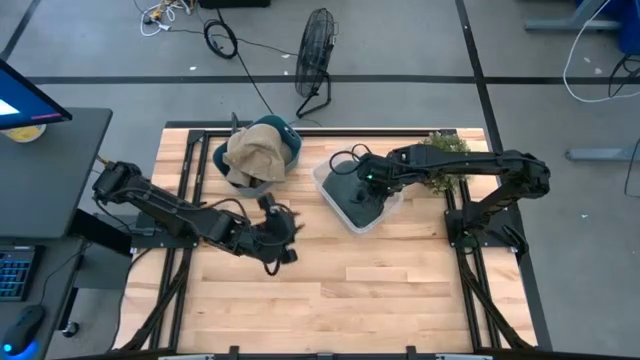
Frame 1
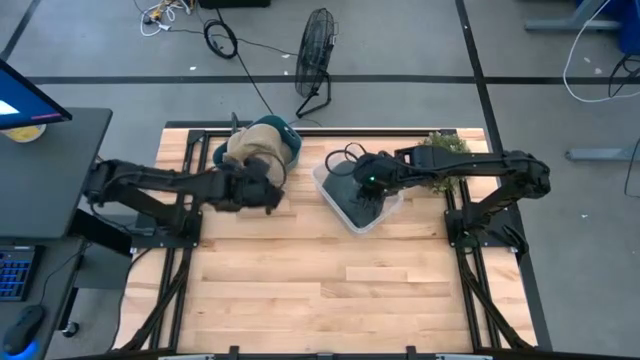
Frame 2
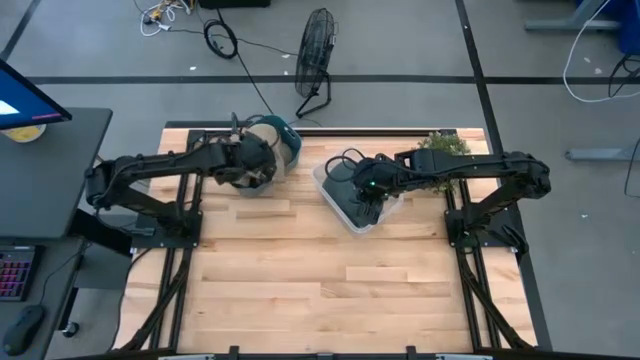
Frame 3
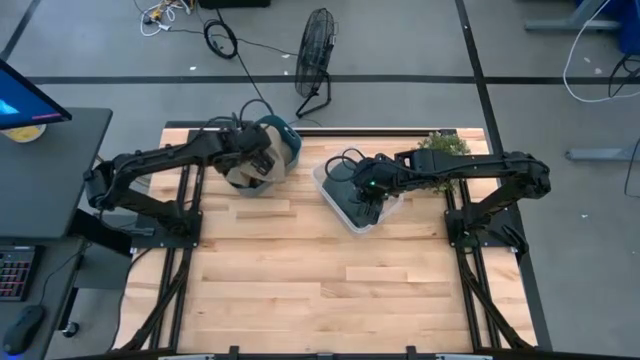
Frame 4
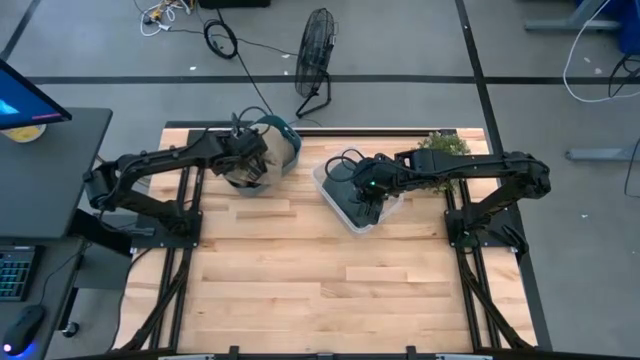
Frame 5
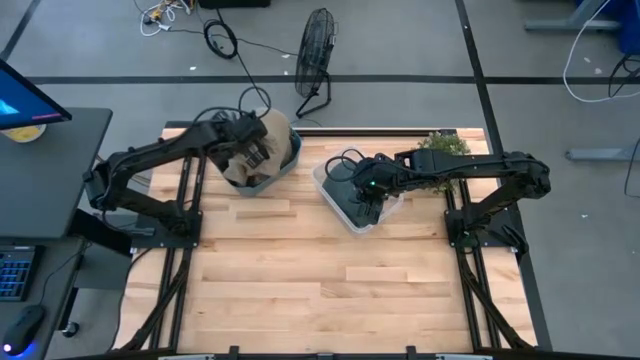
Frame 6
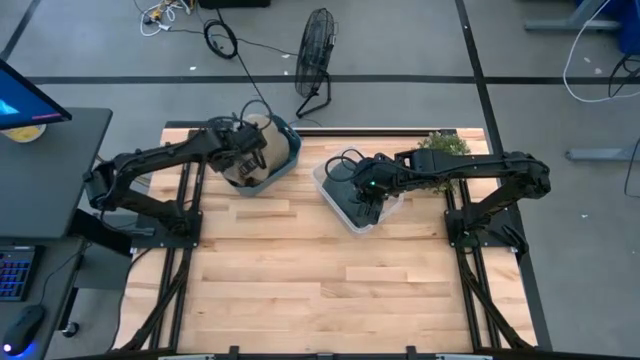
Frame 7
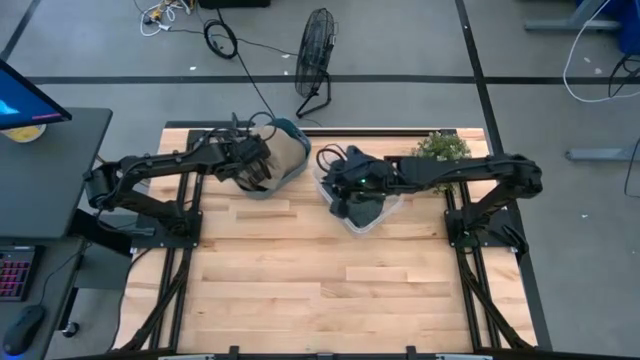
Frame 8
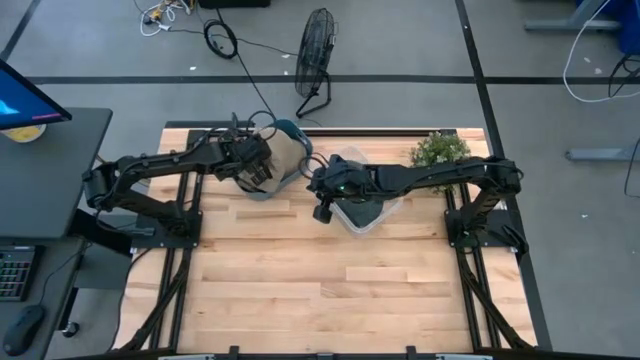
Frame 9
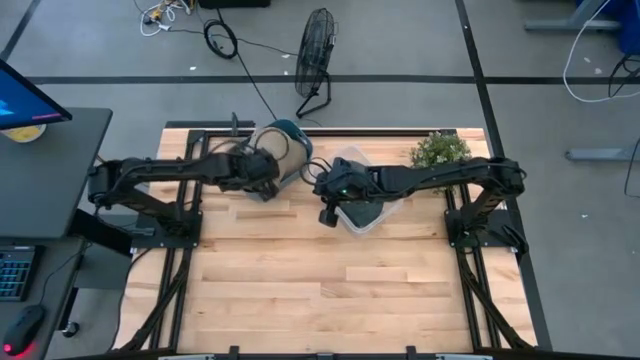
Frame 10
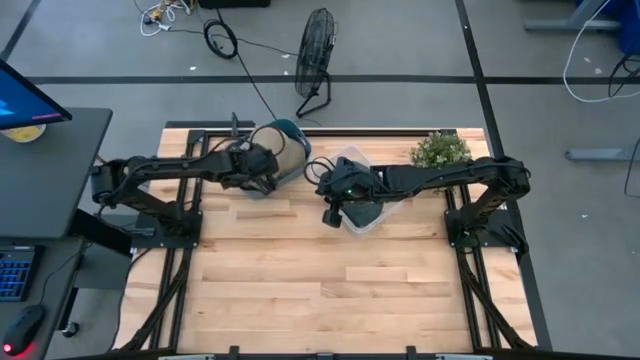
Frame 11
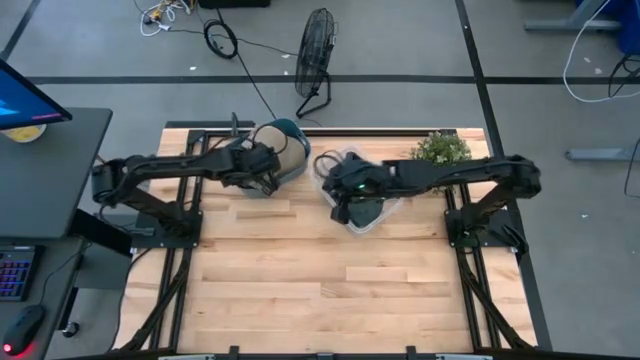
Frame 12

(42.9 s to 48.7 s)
Task: Pick & Place hat
Adjust the brown caps in the blue bin

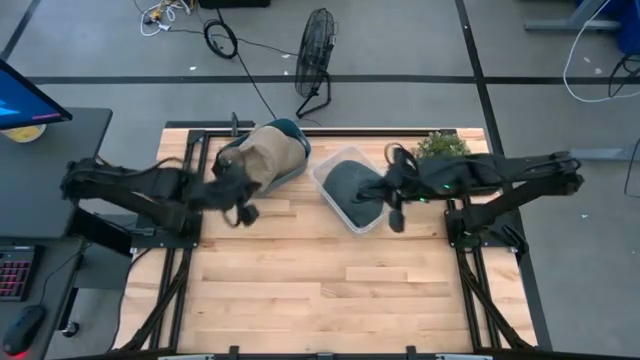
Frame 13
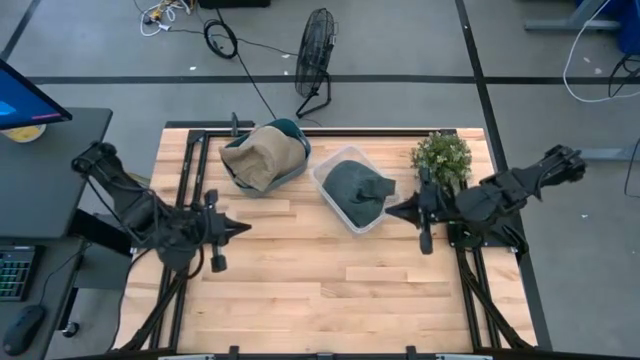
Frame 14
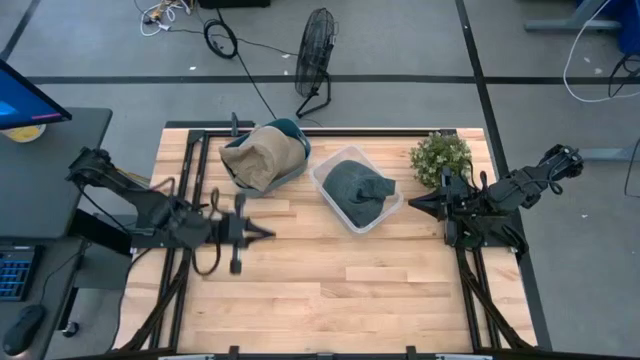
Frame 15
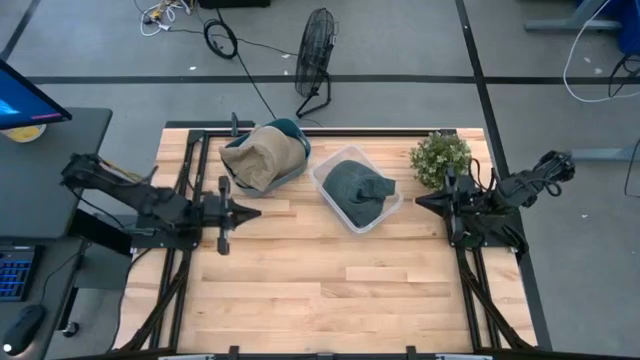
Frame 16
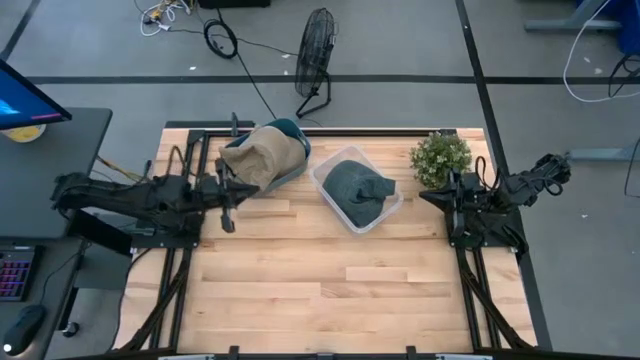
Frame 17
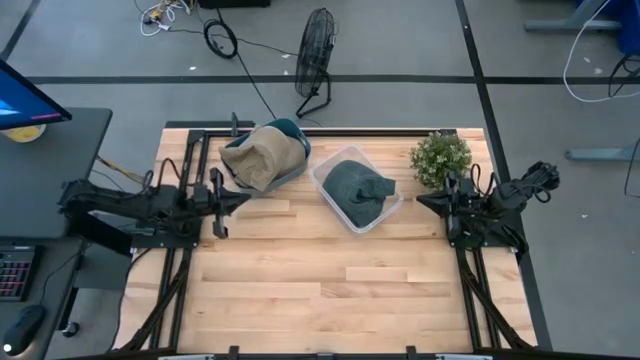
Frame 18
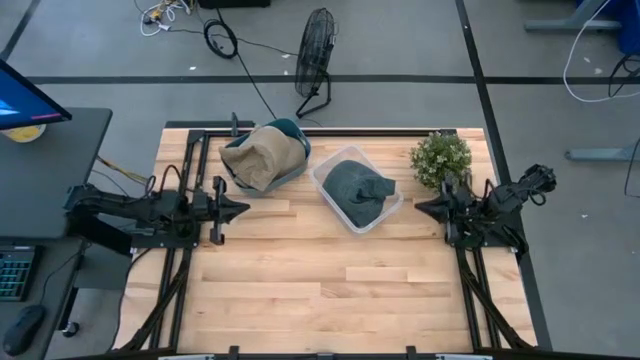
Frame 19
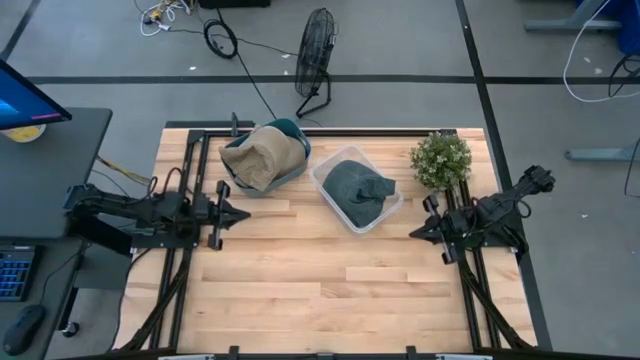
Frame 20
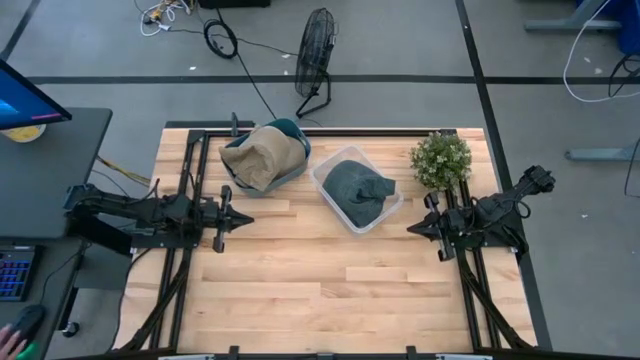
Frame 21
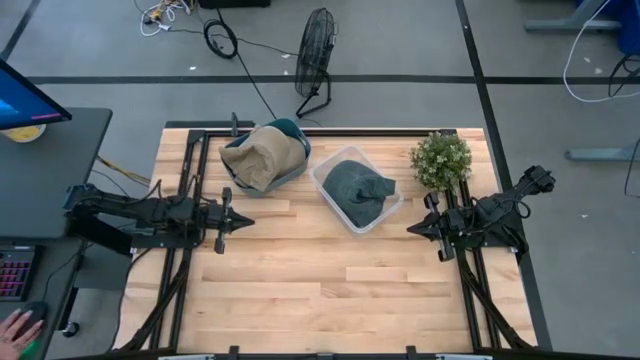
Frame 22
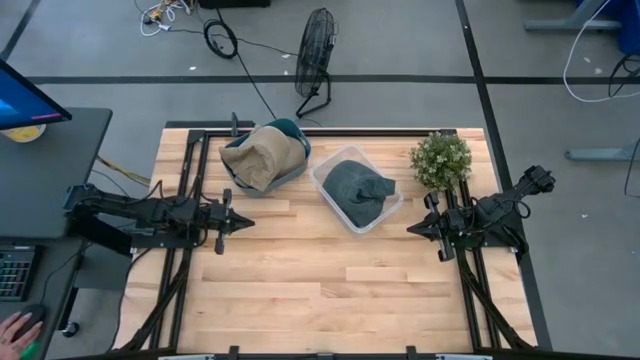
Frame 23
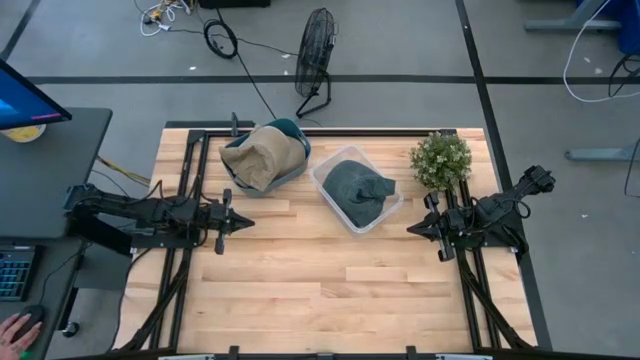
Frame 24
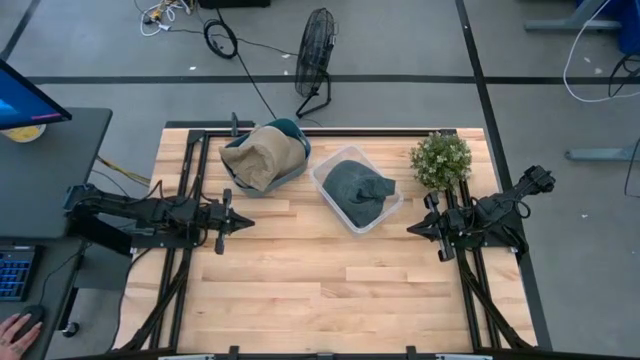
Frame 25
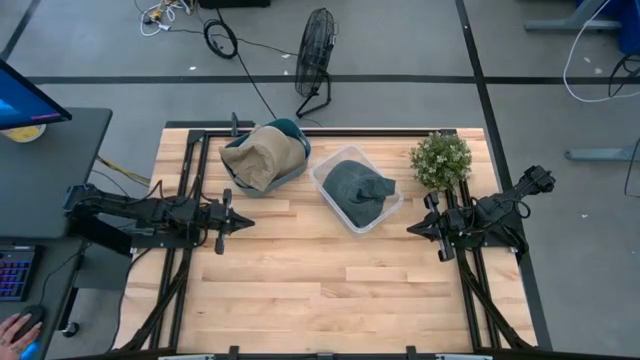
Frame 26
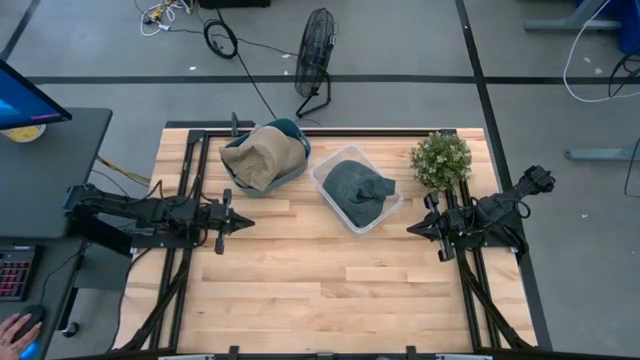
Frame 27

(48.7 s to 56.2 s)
Return to Home Position

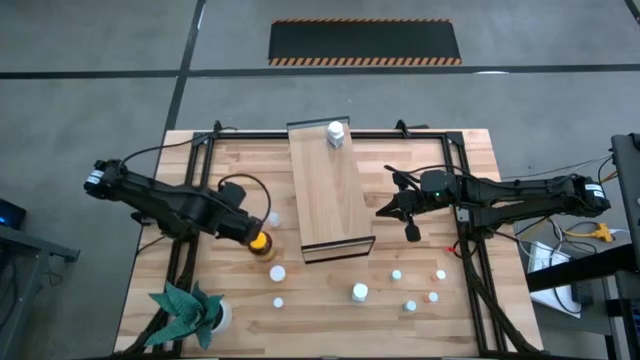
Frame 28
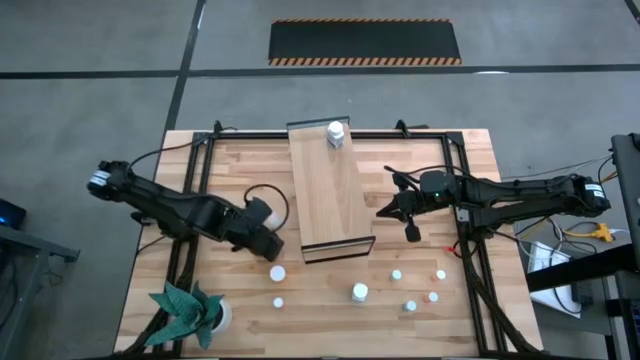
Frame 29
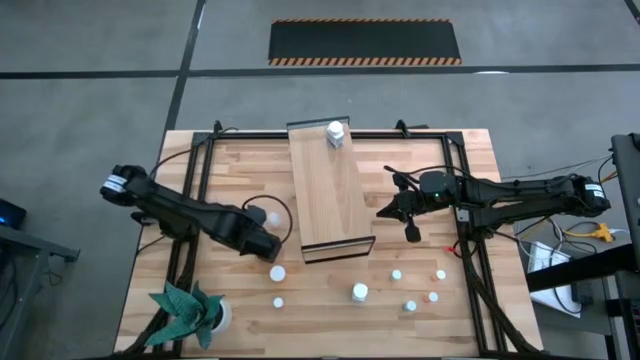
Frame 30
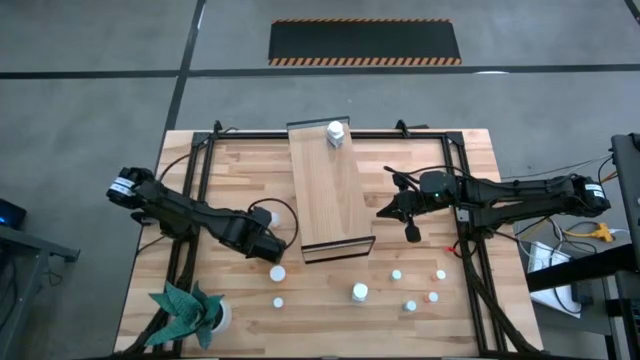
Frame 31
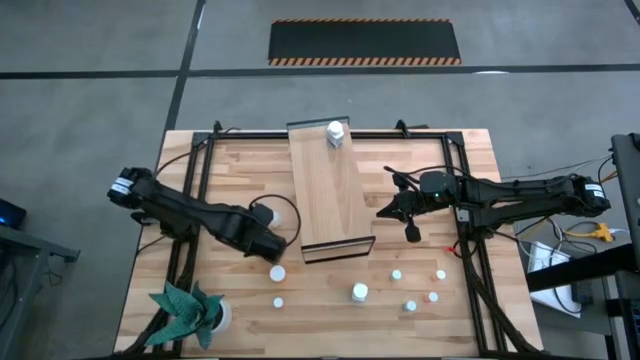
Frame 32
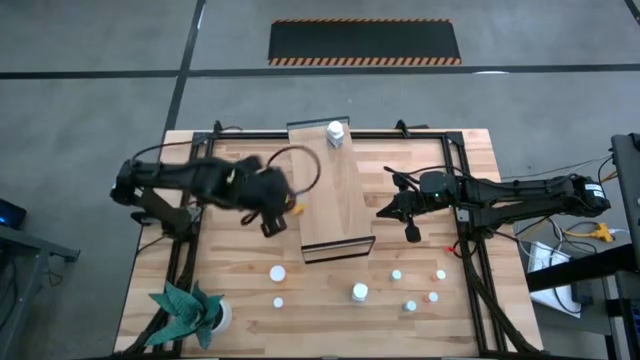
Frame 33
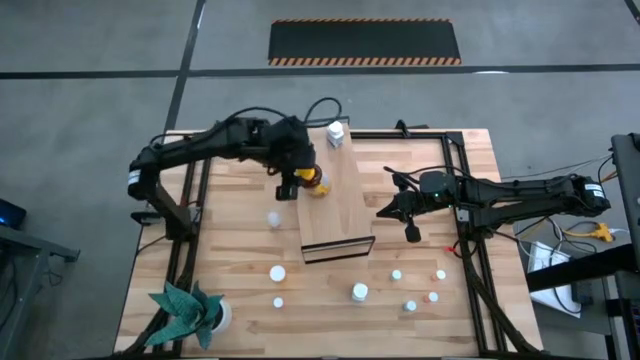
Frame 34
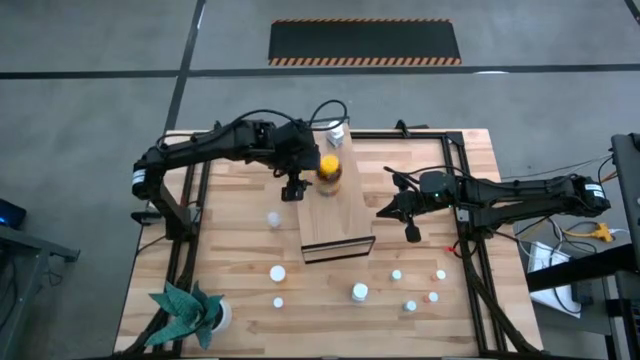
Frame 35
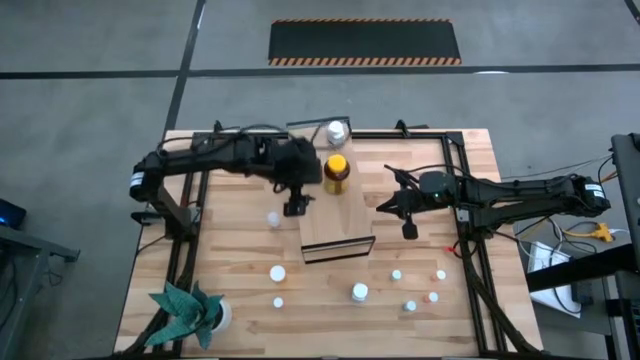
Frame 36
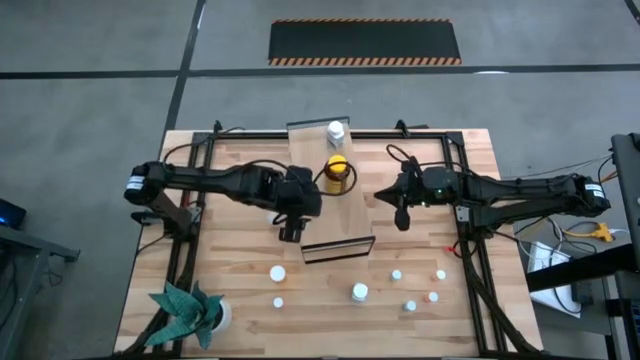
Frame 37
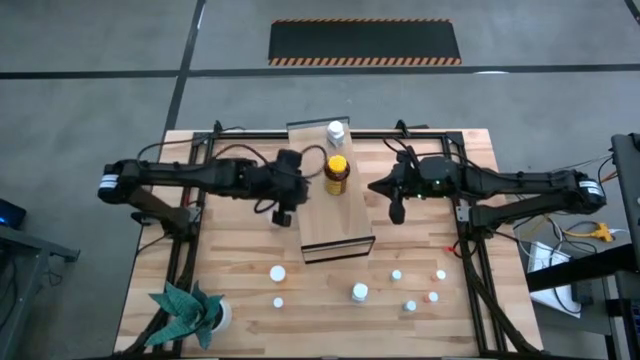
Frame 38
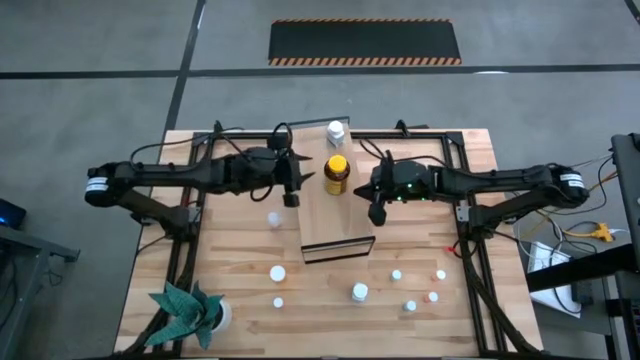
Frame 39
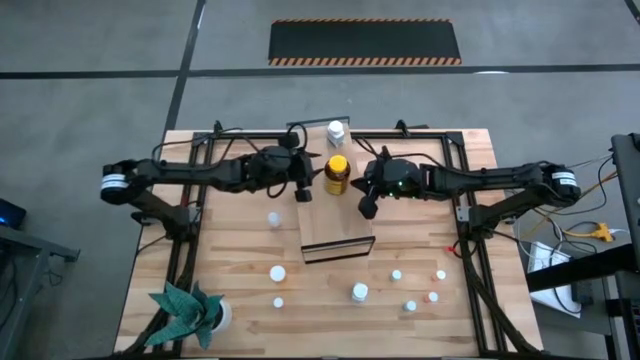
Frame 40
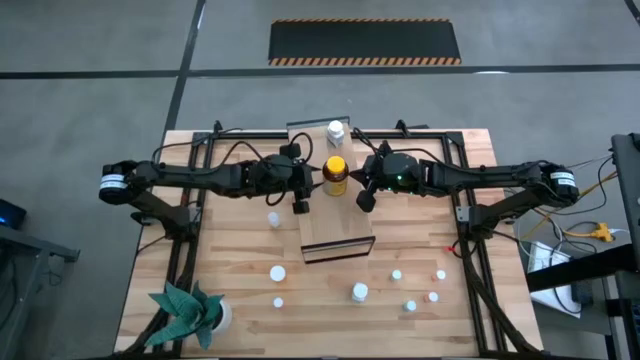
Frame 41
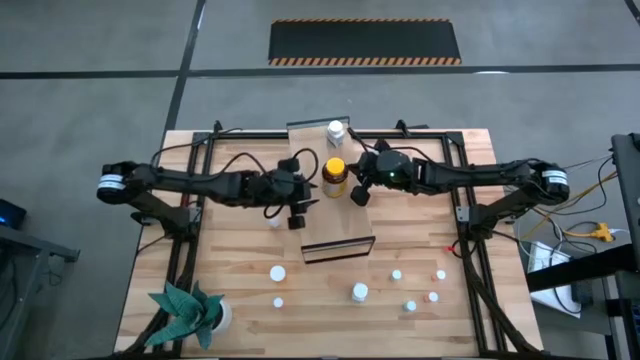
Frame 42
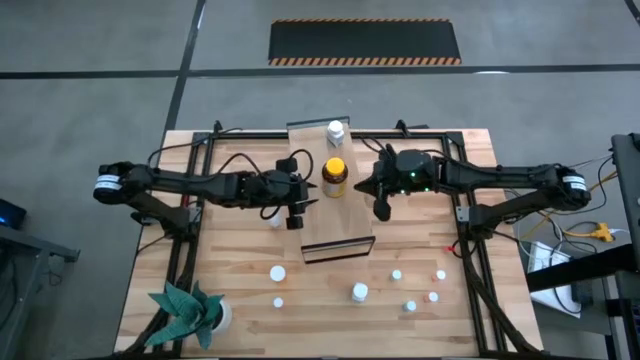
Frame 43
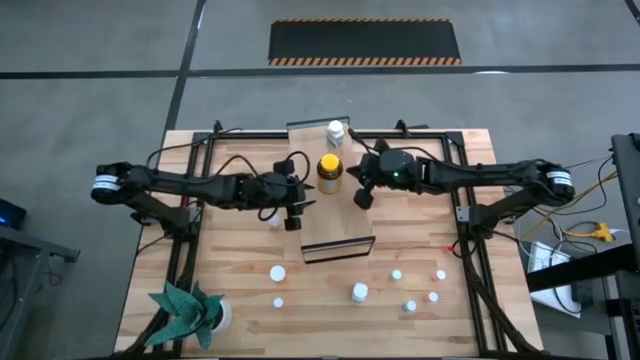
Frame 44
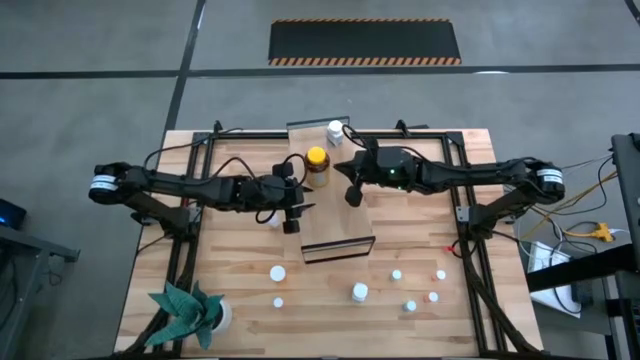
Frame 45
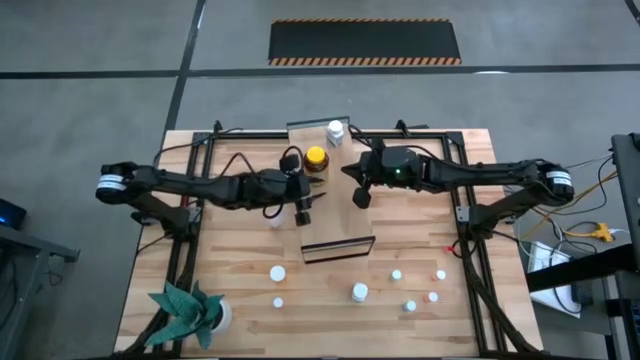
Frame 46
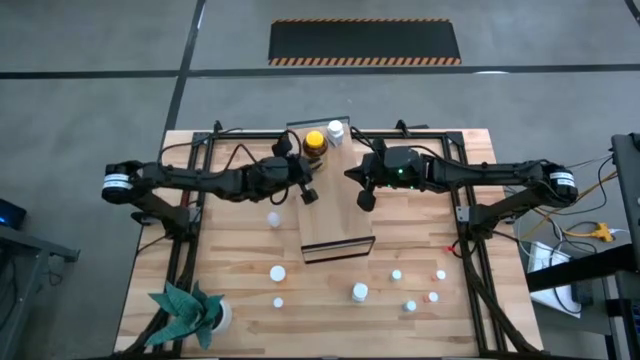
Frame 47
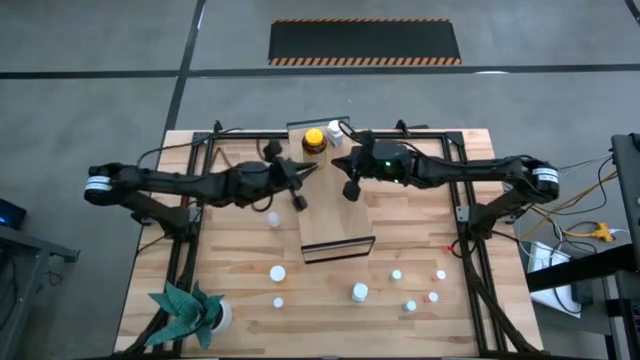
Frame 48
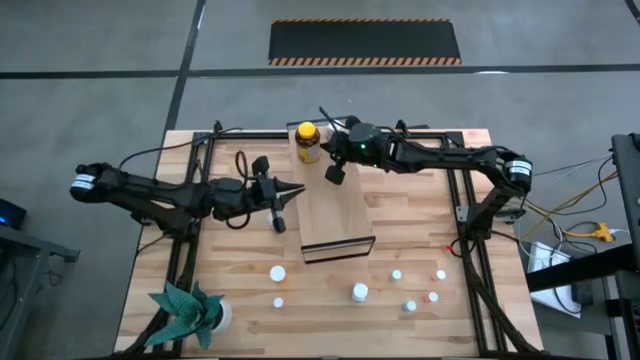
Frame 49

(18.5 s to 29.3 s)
Task: Pick and place medicine bottles onto shelf by color
Put the yellow pill bottle on the shelf
